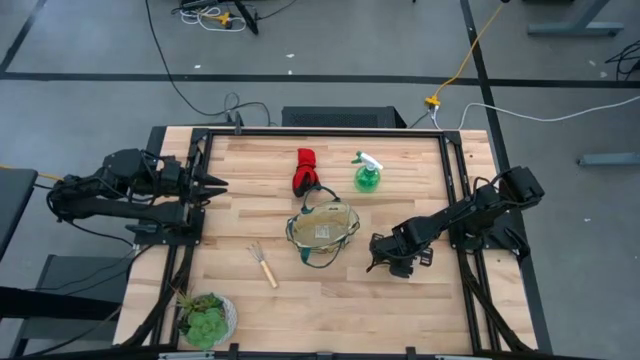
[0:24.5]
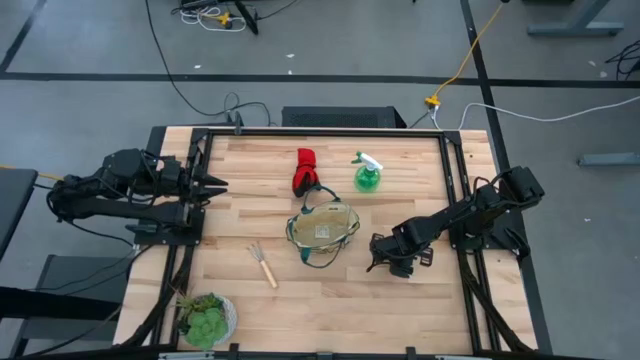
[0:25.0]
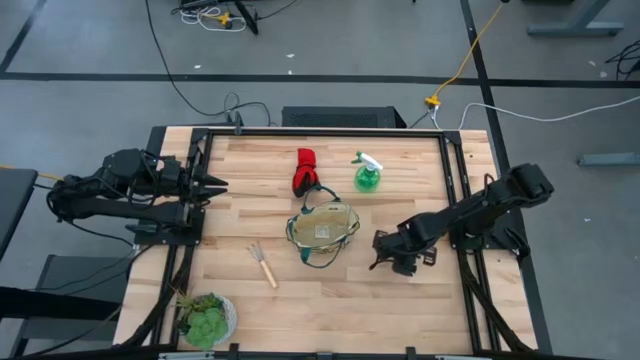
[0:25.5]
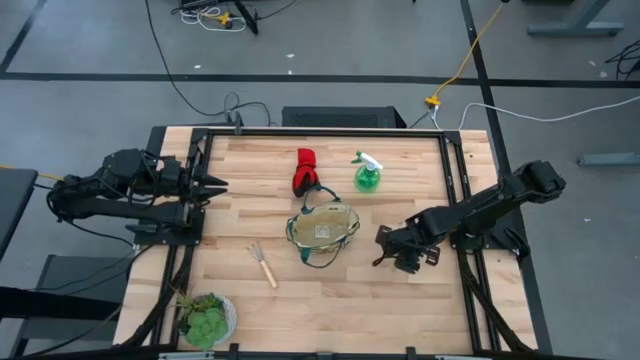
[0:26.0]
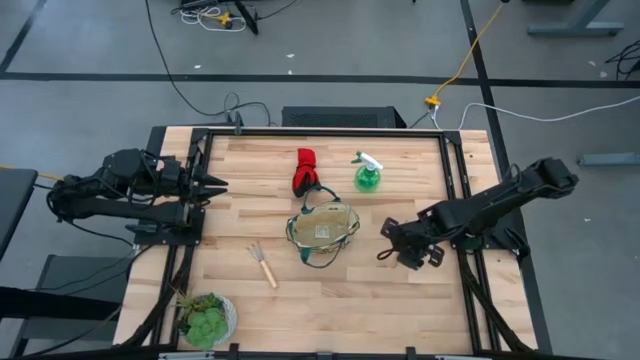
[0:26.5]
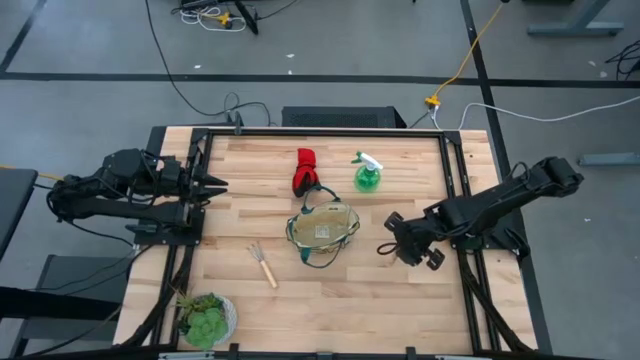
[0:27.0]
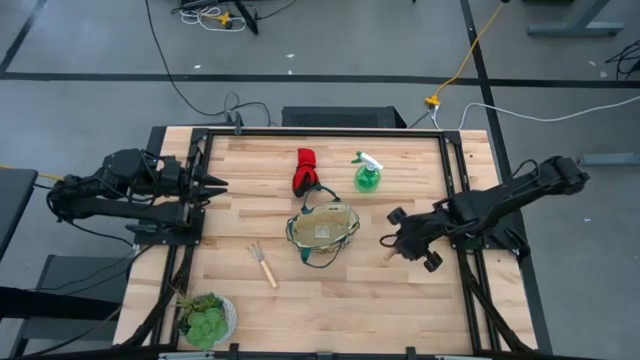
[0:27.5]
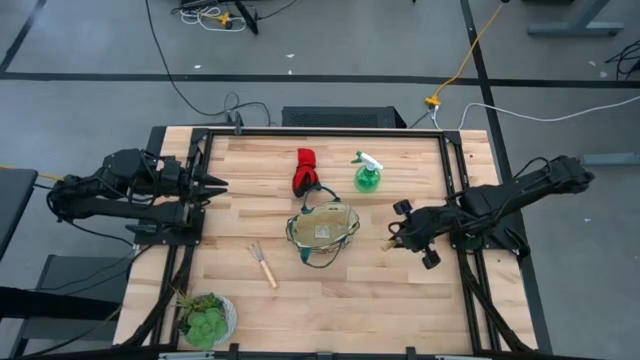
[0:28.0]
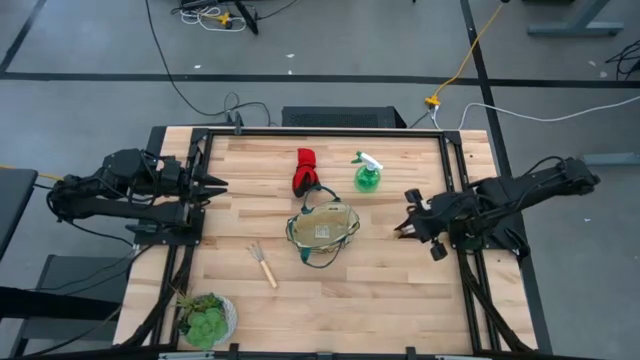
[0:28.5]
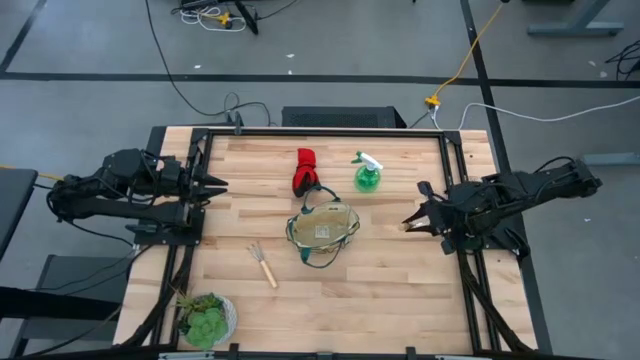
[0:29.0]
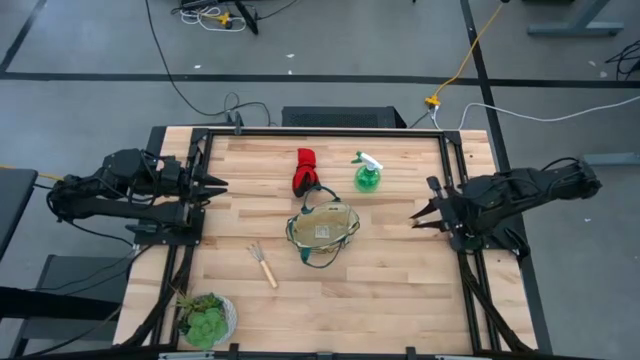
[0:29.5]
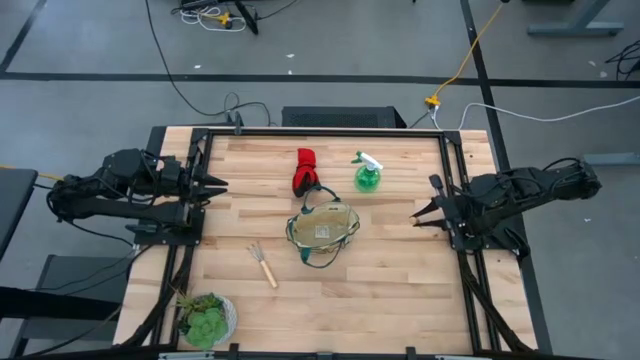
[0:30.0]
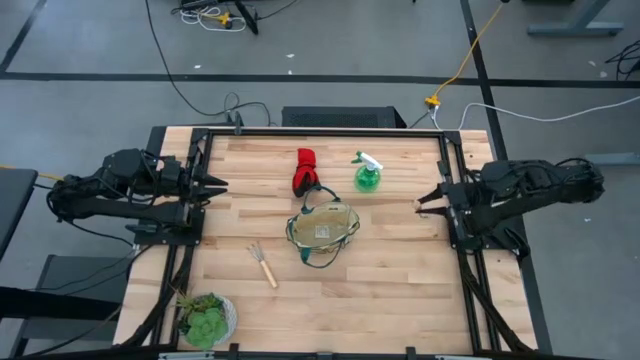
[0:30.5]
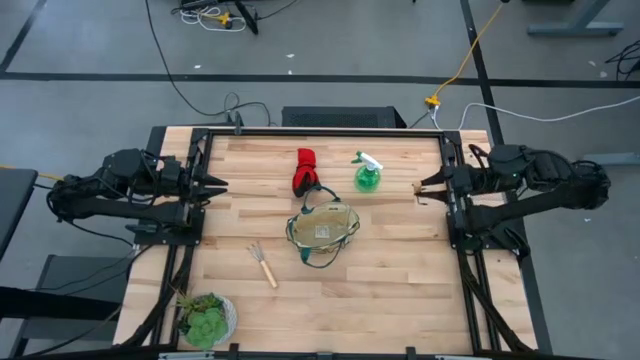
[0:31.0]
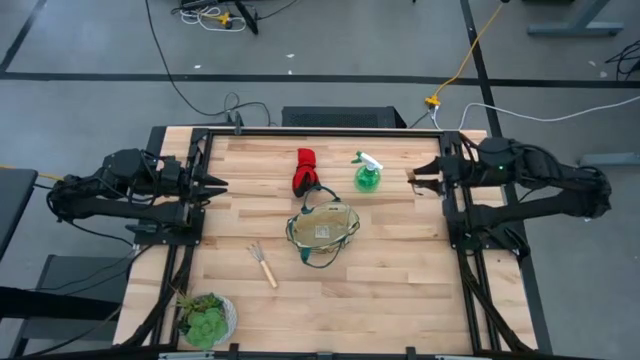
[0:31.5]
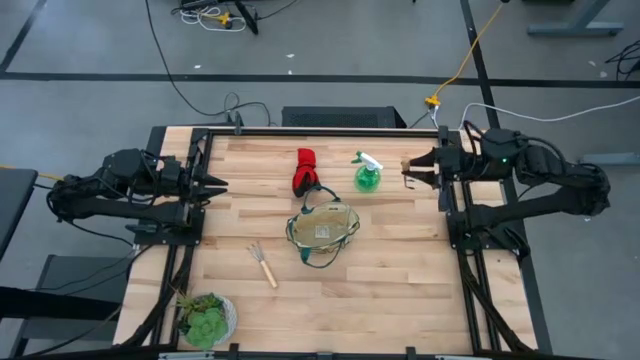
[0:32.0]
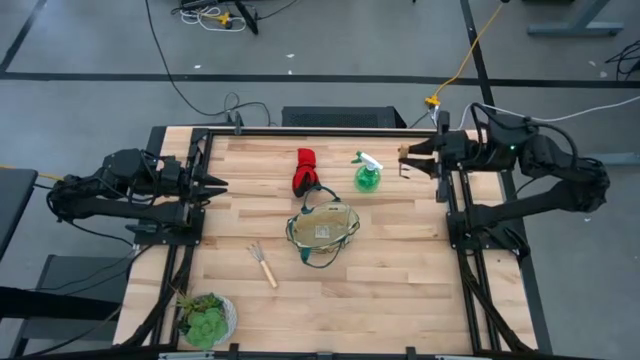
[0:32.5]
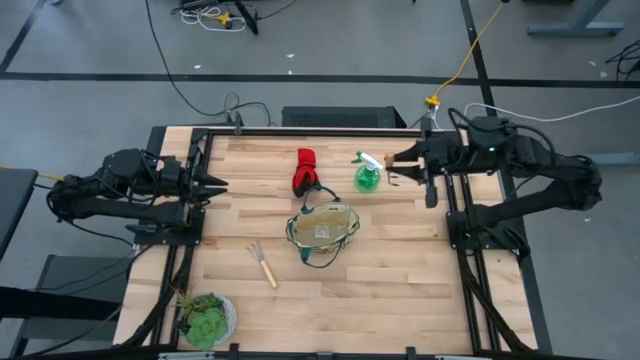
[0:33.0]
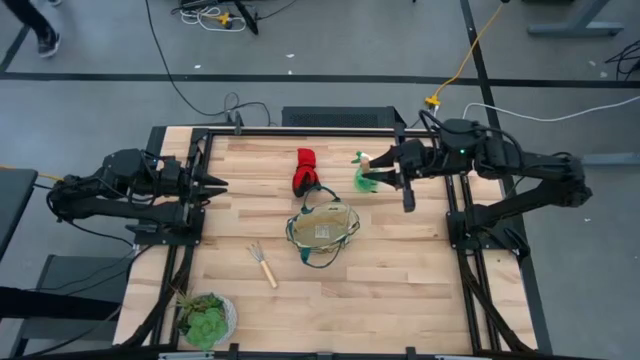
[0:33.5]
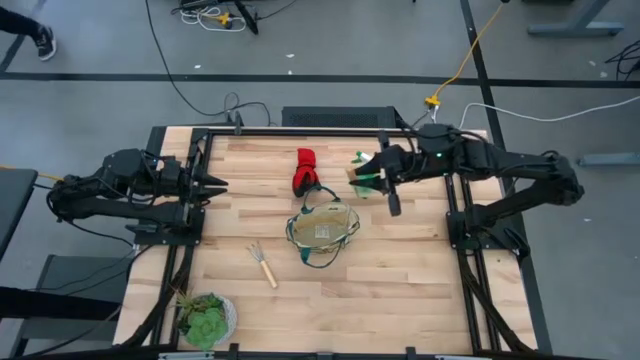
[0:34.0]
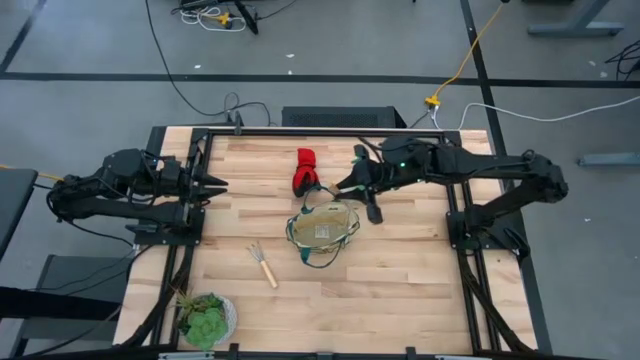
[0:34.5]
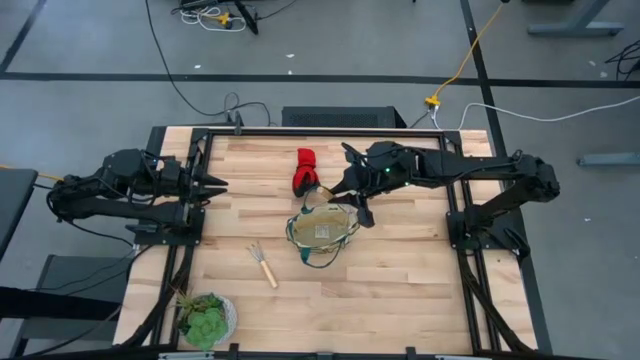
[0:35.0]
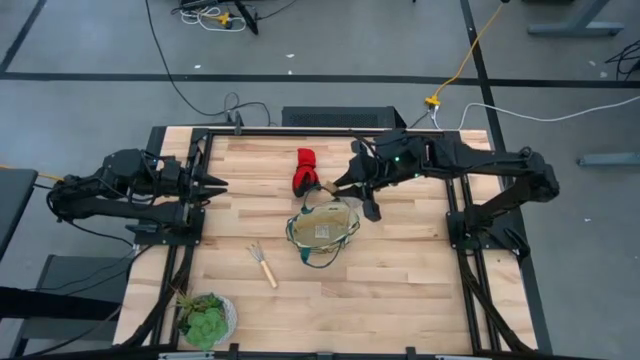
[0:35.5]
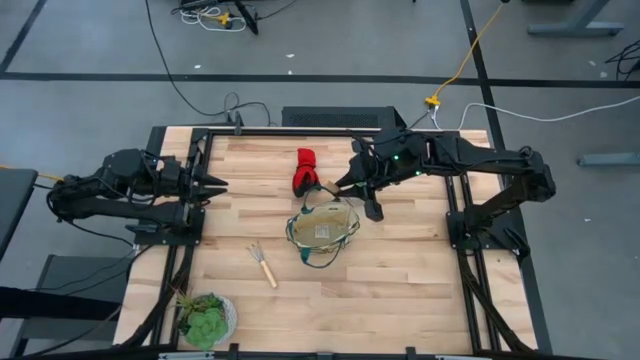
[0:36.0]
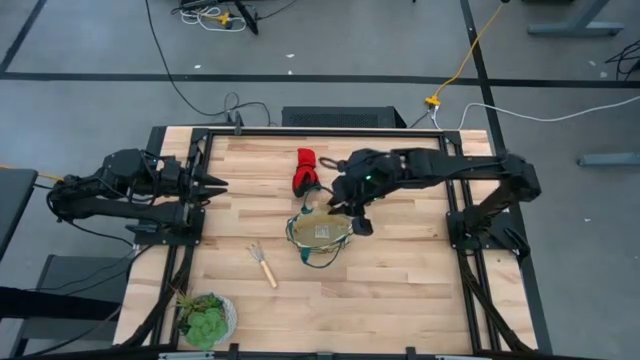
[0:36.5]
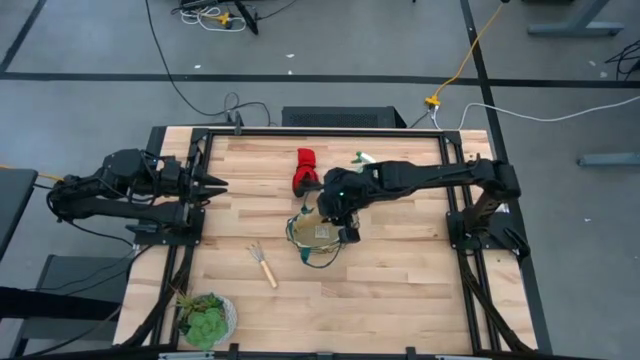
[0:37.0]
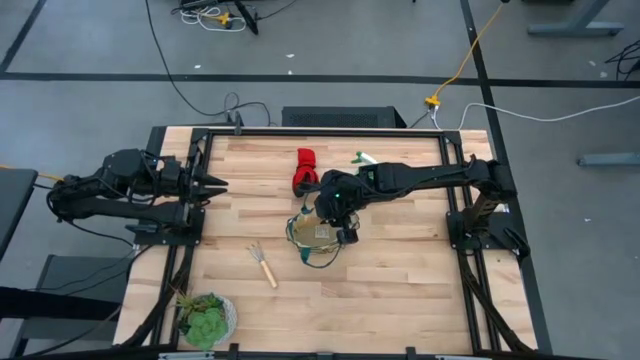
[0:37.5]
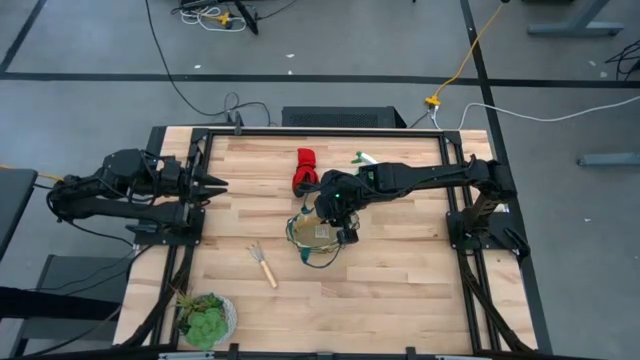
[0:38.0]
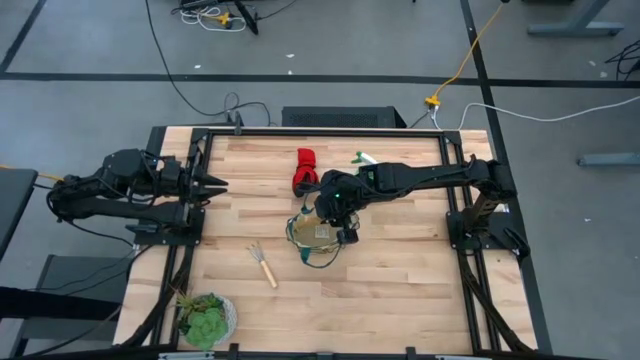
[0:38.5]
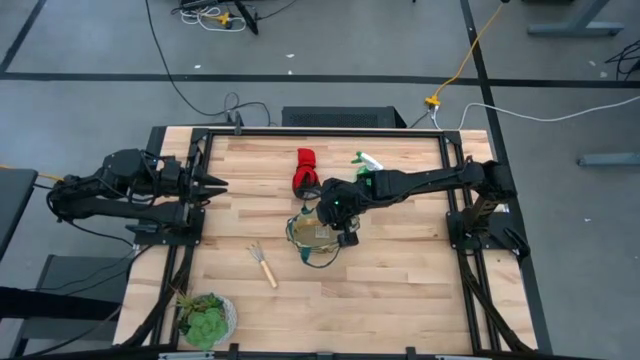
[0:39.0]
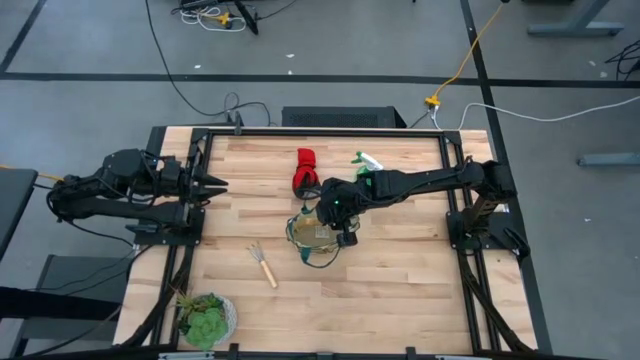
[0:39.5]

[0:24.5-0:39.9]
Task: Pick & Place Garden tools in Gardening bag
Put the light brown trowel into the light brown and green gardening bag

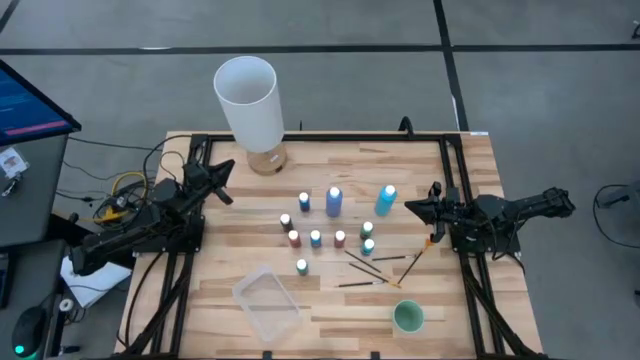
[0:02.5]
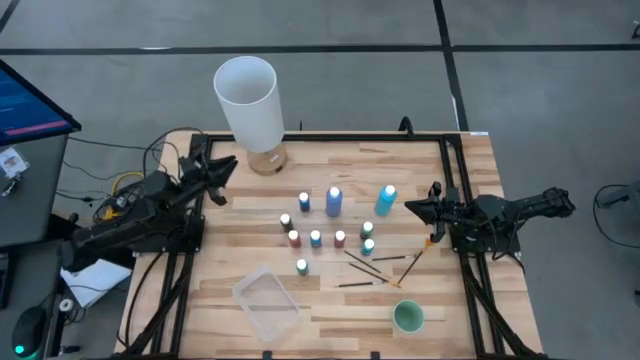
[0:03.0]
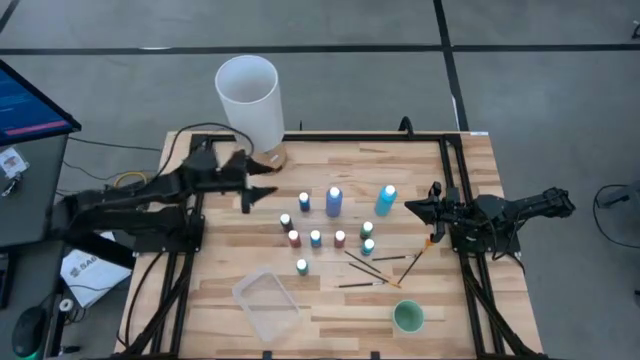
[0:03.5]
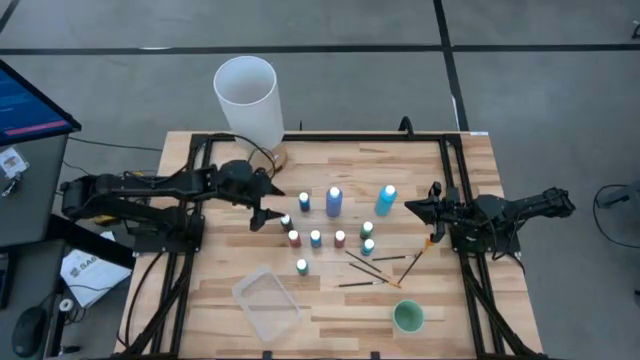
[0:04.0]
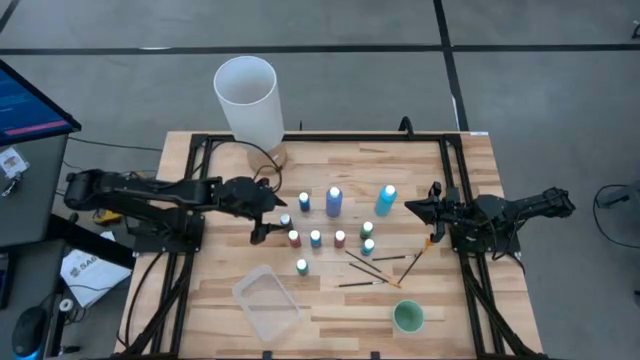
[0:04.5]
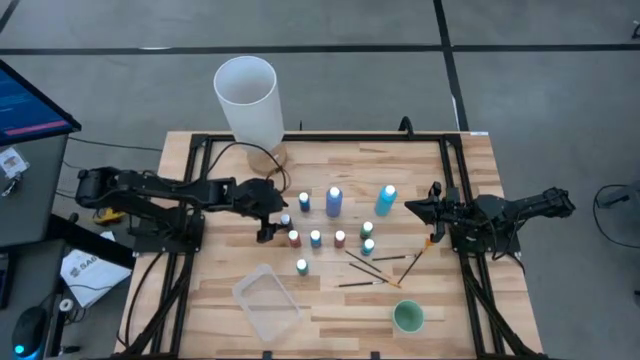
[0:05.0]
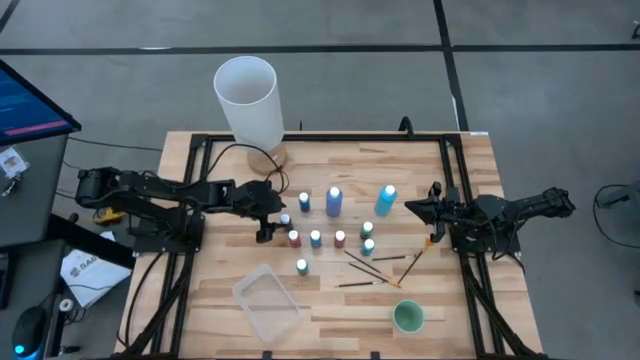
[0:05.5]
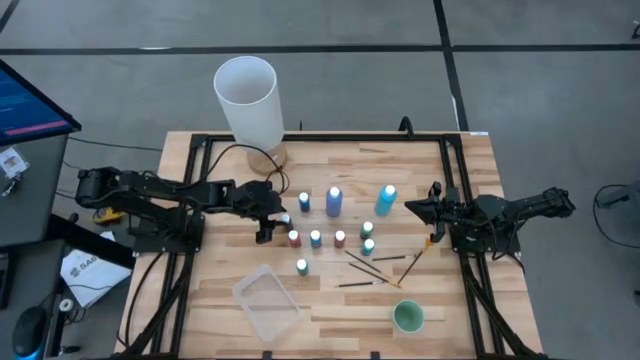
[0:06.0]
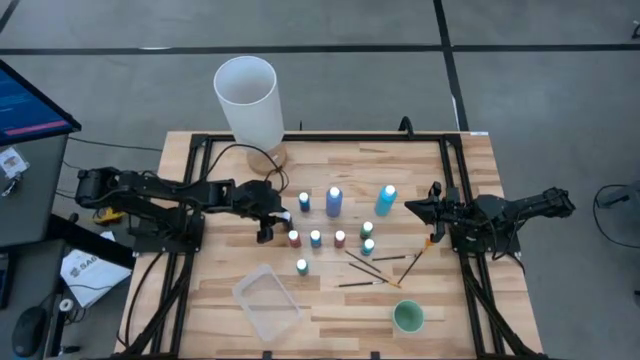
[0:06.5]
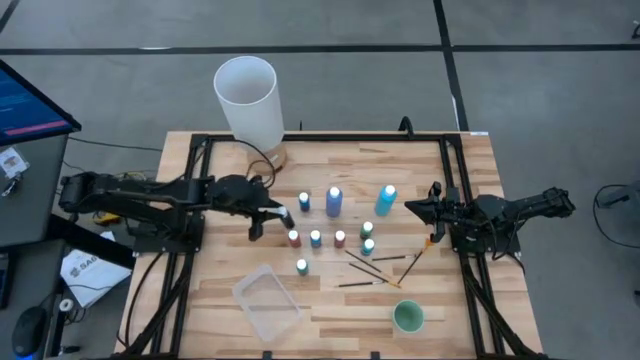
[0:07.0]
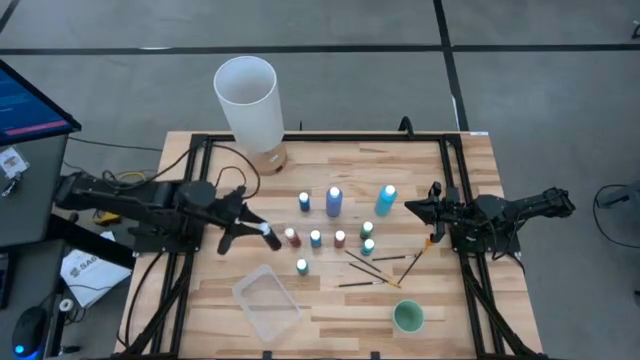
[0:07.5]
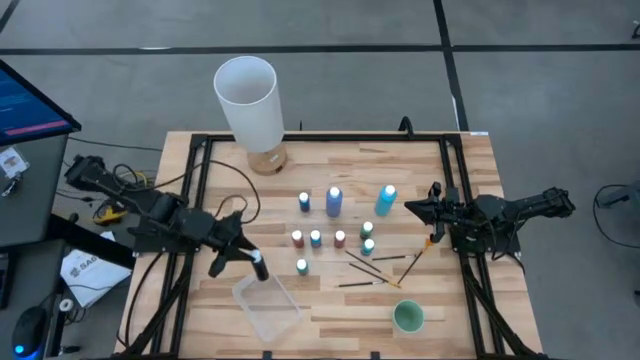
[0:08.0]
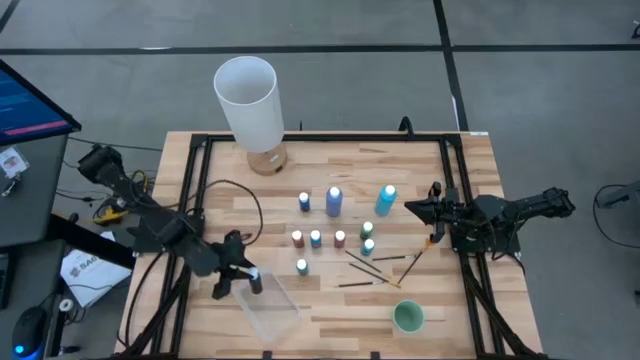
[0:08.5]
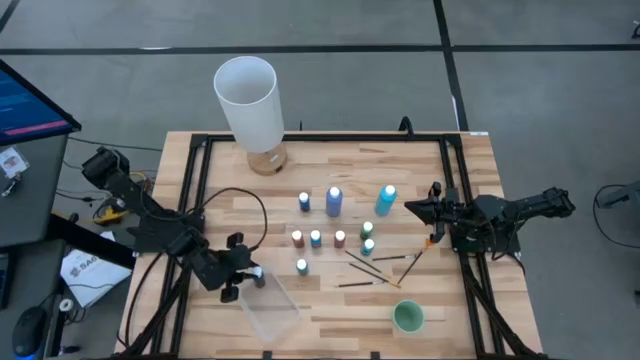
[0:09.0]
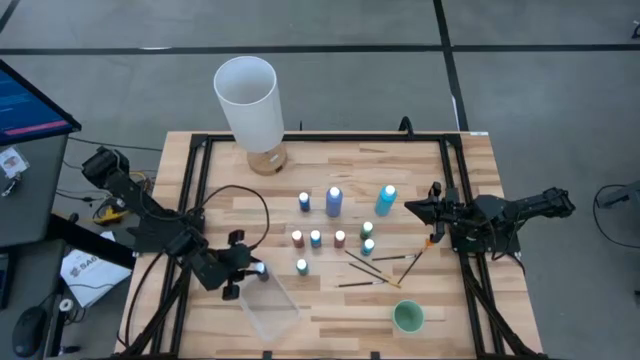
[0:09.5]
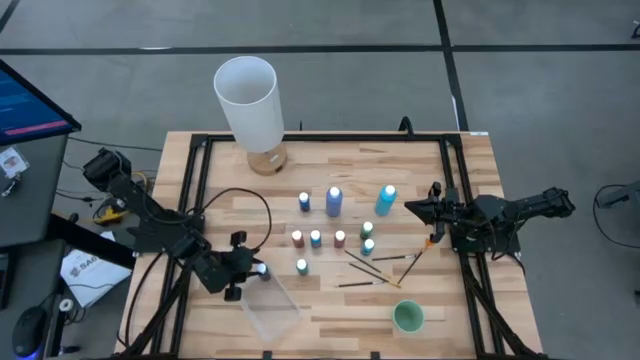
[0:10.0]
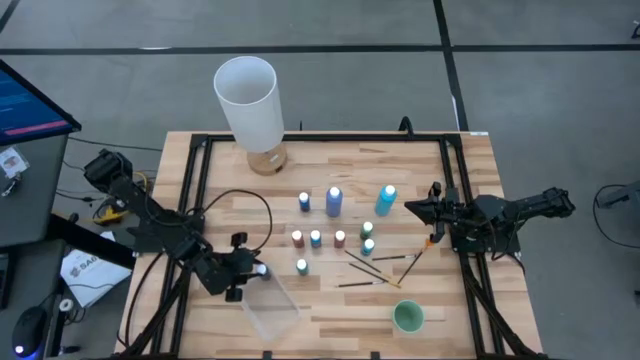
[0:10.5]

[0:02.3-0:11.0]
Task: Pick & Place Paint Supplies
Put the black paint bottle into the transparent bin
